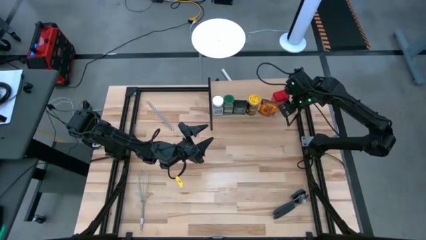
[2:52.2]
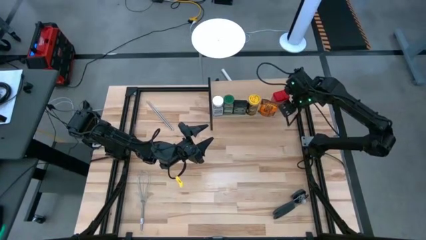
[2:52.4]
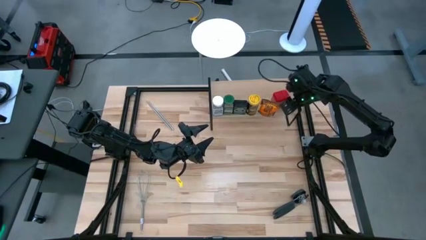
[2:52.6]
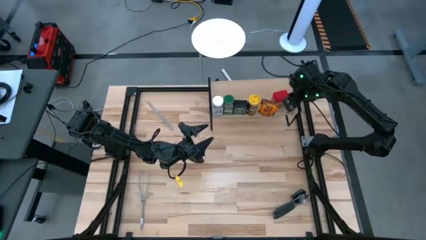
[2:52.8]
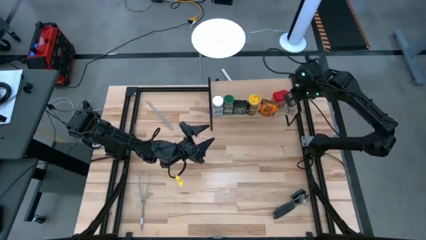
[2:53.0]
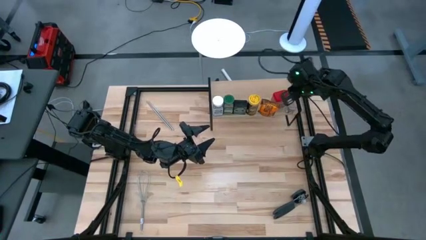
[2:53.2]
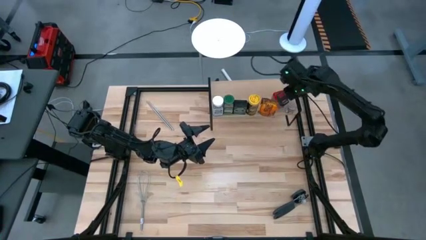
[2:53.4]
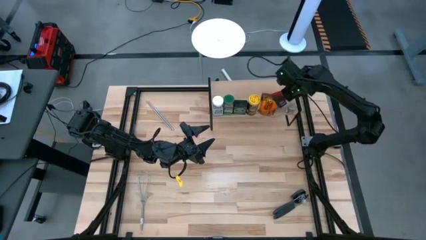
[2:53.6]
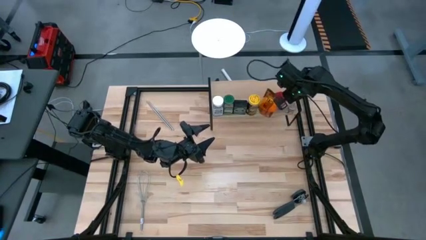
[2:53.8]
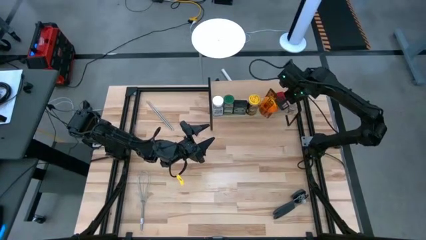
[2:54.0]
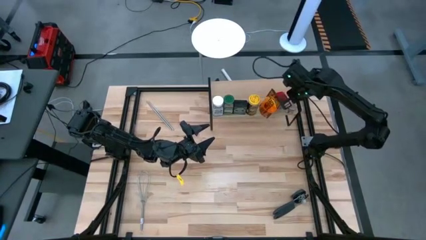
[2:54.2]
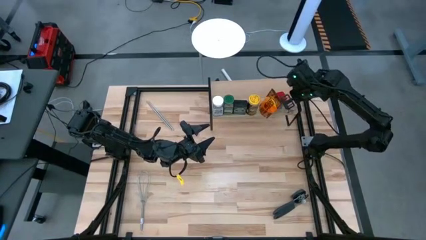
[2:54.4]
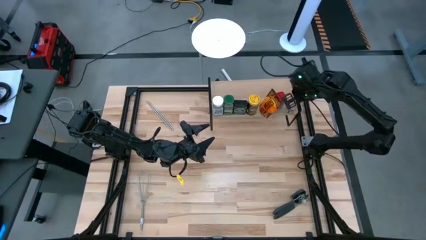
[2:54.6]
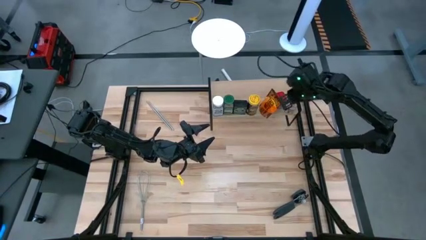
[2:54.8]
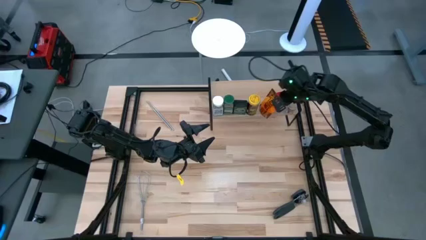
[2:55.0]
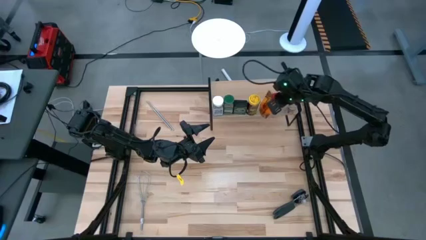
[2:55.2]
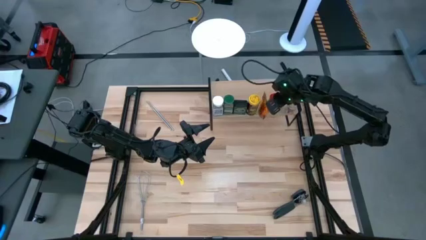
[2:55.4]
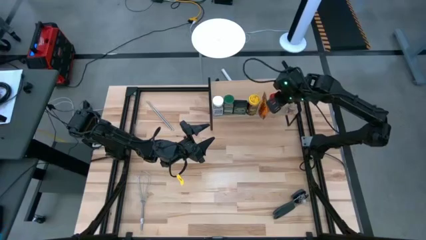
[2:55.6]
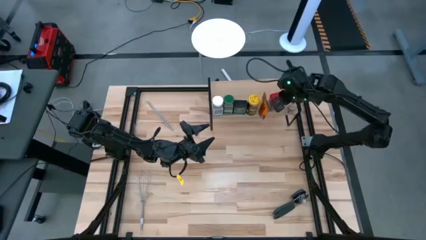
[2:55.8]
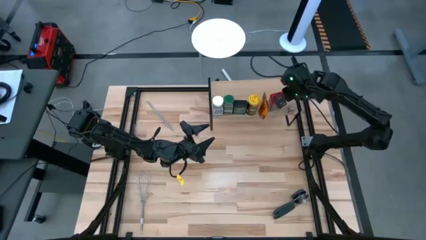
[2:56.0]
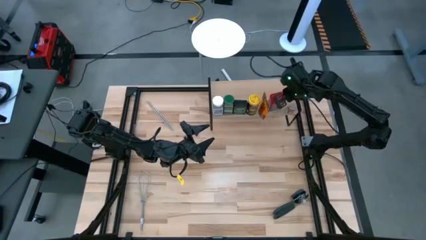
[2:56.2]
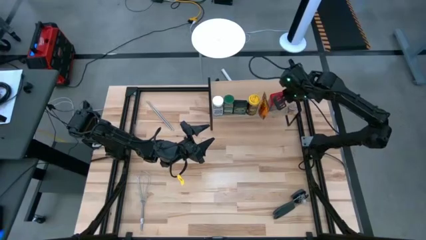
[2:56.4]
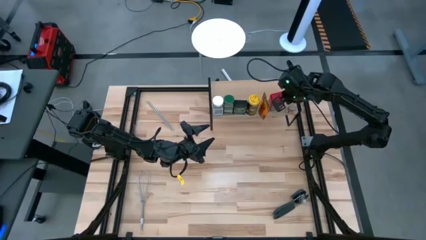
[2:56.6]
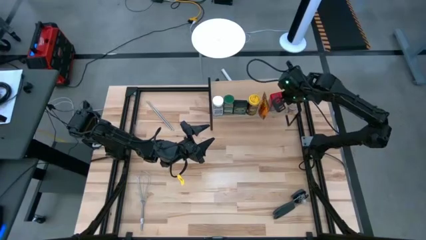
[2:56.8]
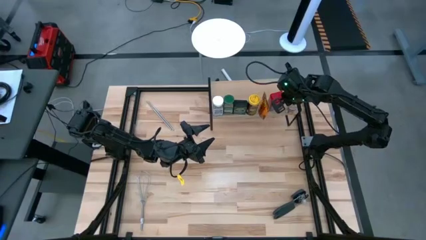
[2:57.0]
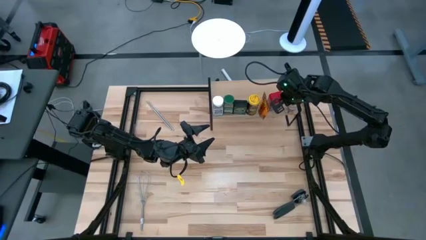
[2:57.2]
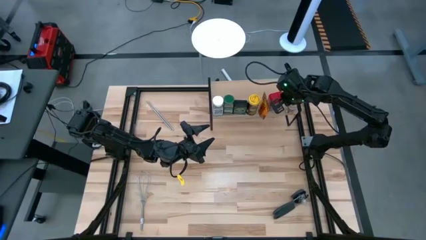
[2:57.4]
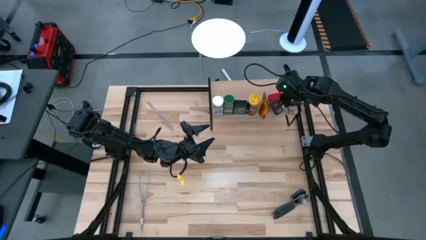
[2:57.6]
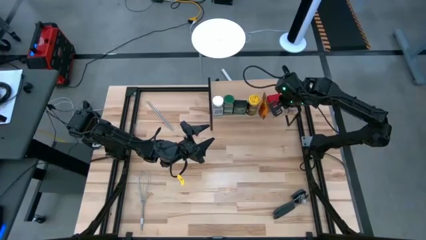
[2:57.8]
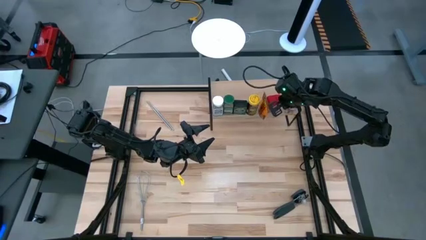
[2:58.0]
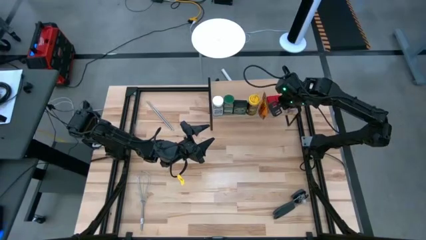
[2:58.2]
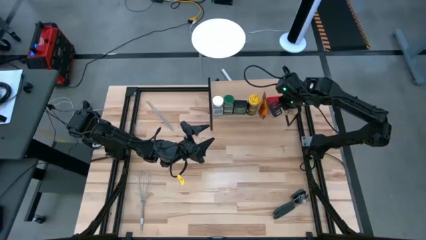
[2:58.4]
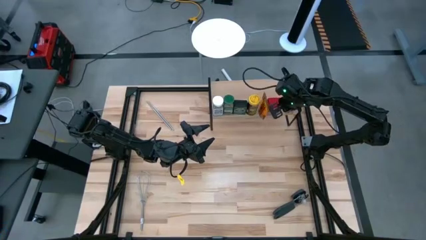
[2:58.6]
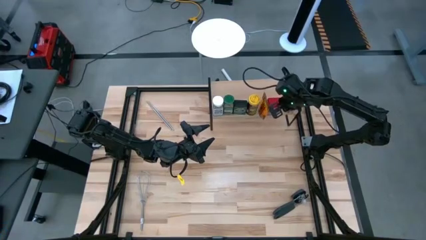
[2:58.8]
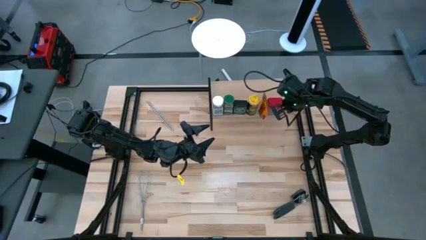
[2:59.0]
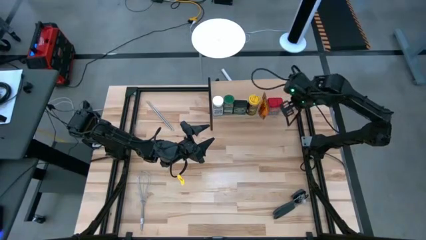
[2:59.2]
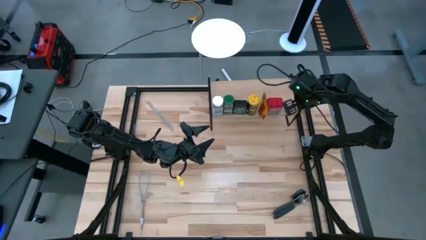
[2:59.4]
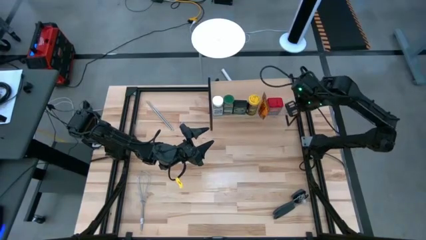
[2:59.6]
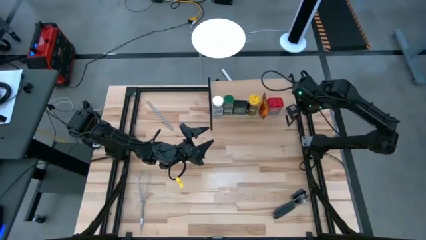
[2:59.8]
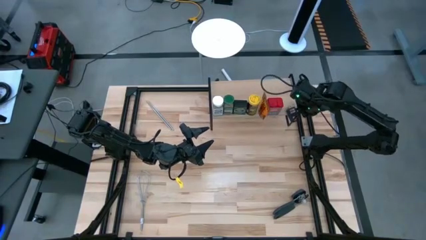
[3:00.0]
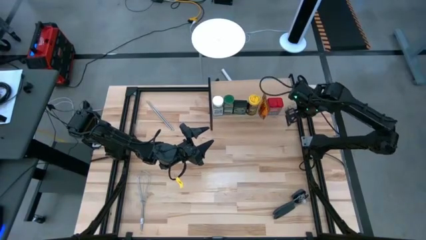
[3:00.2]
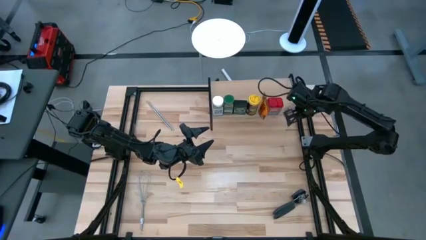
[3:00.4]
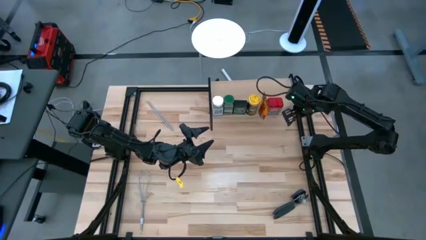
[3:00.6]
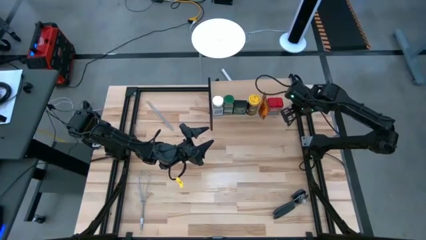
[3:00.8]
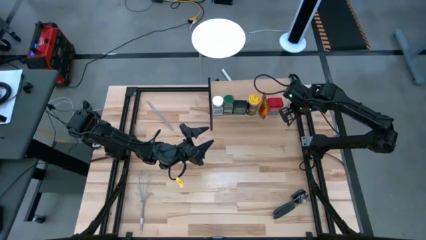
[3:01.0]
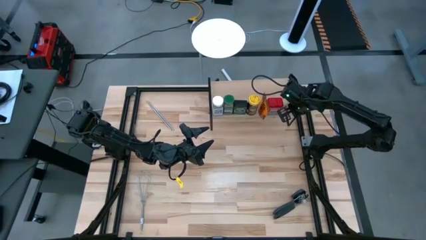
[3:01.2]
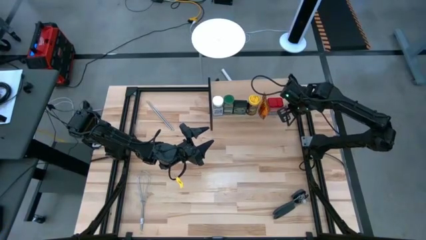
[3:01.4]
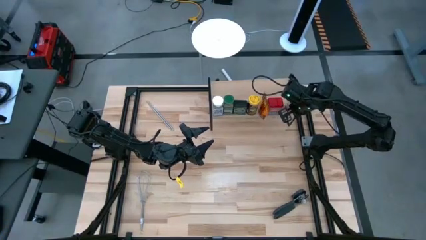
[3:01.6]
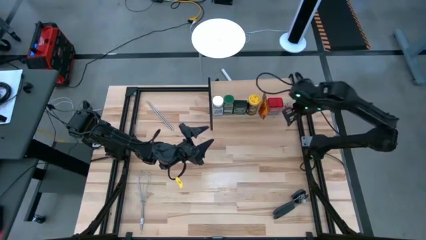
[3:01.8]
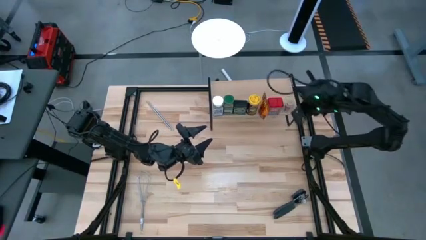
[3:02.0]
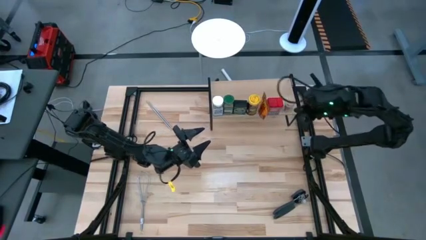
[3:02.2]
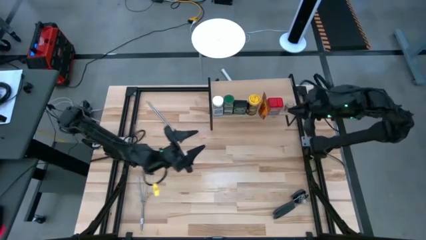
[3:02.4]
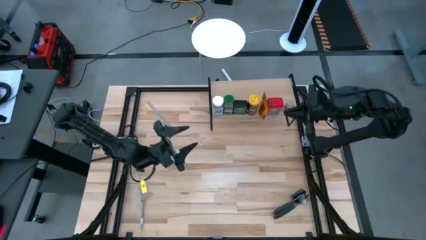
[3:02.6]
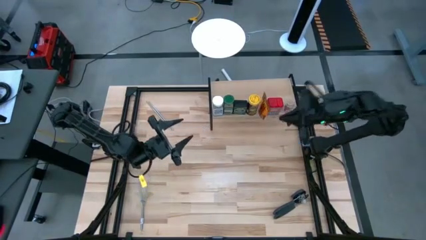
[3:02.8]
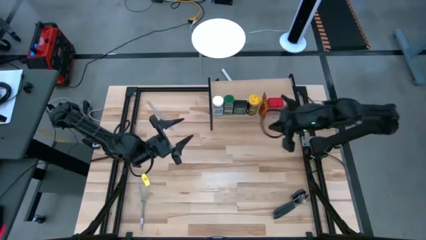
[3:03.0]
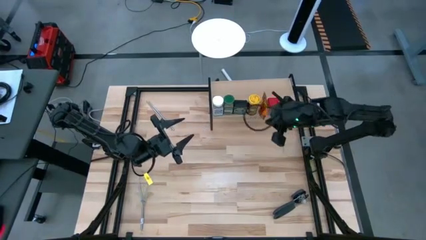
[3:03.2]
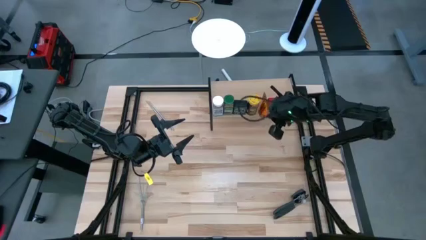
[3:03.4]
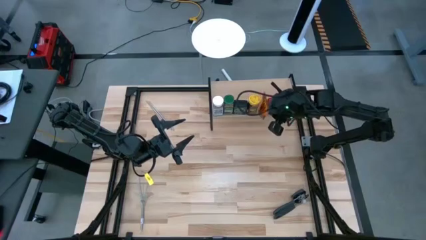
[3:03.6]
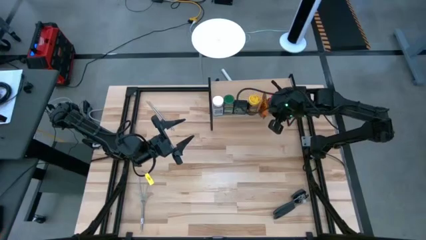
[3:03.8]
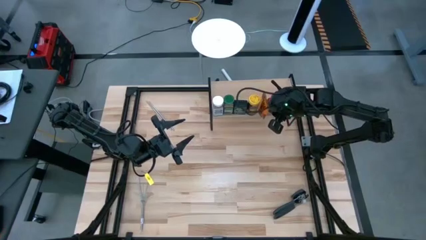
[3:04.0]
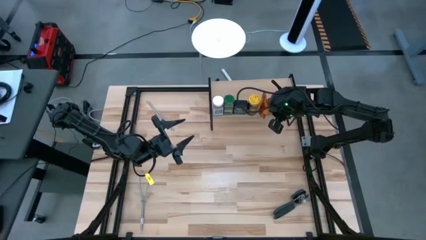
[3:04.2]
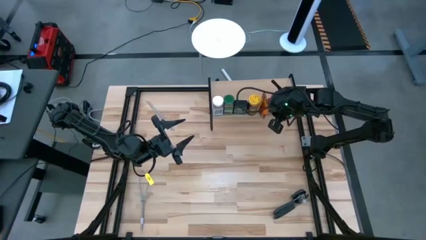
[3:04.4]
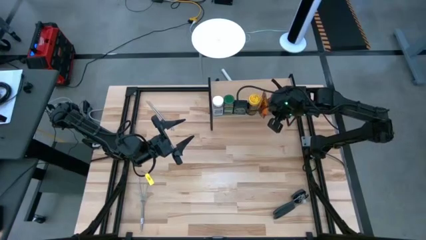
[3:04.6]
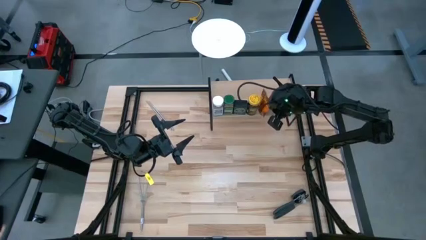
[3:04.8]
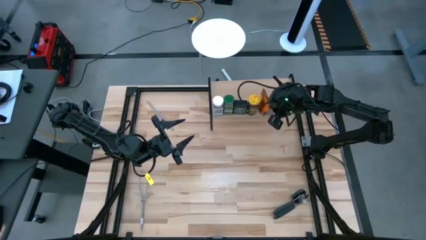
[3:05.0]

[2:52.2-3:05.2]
Task: Shelf spices
Adjust the seasonings on the shelf

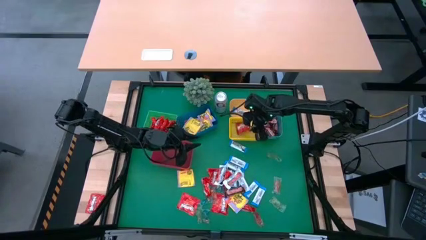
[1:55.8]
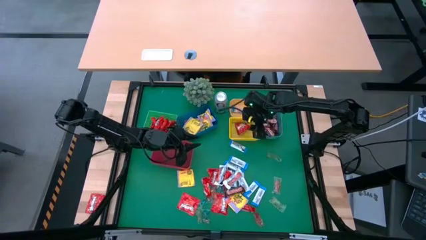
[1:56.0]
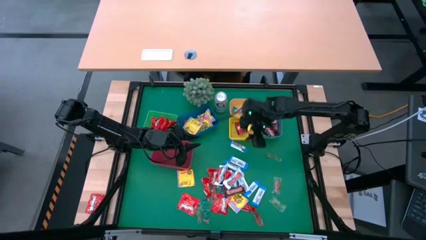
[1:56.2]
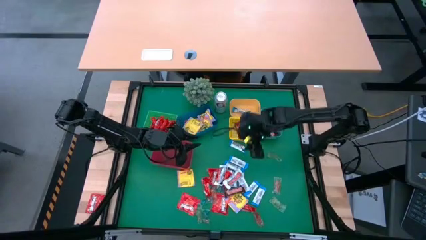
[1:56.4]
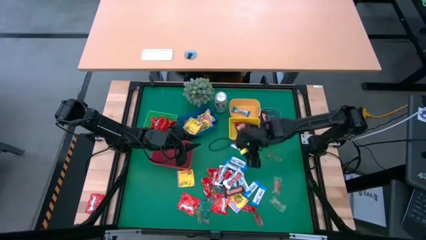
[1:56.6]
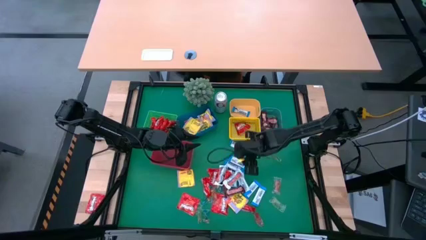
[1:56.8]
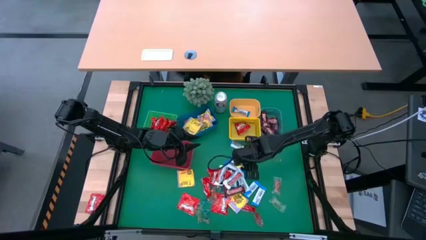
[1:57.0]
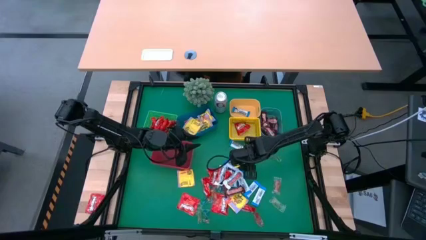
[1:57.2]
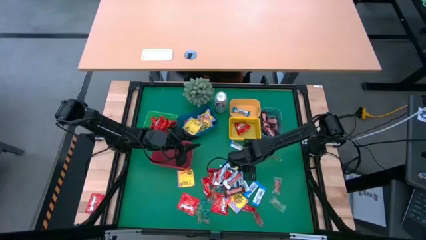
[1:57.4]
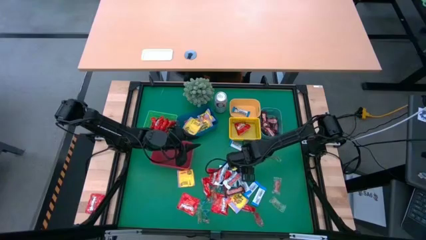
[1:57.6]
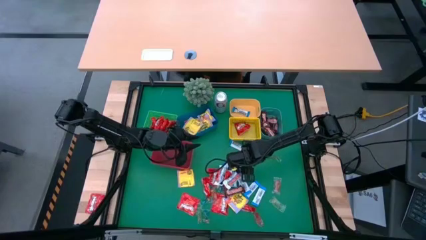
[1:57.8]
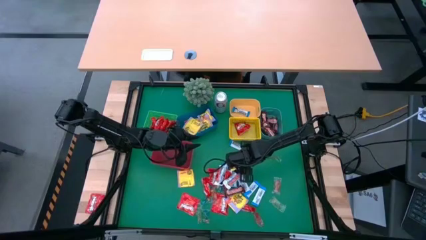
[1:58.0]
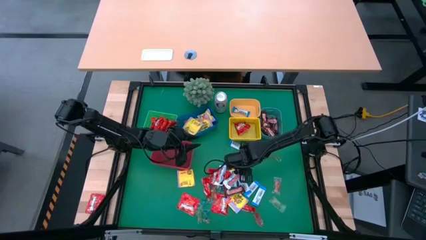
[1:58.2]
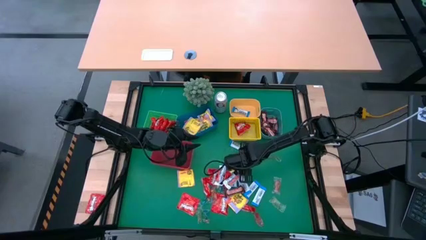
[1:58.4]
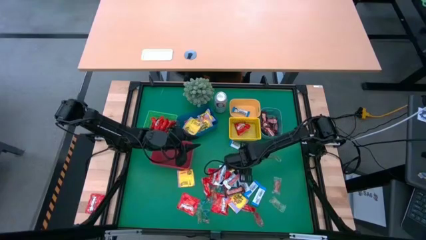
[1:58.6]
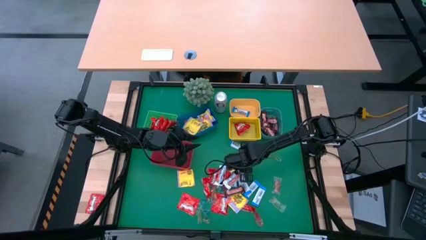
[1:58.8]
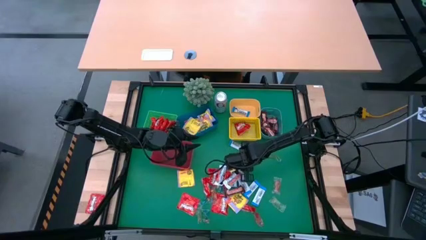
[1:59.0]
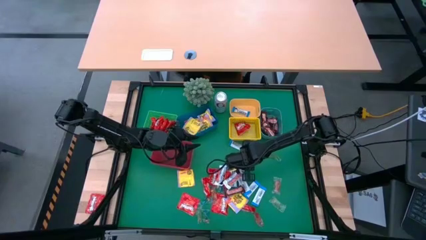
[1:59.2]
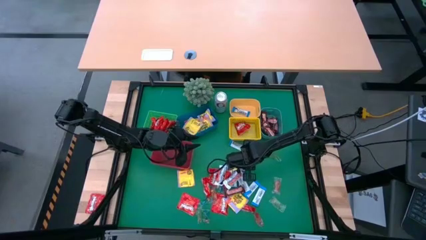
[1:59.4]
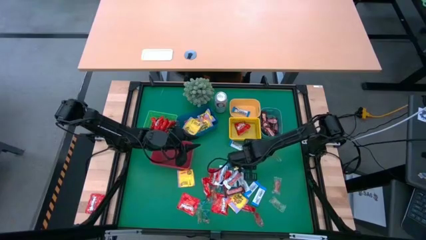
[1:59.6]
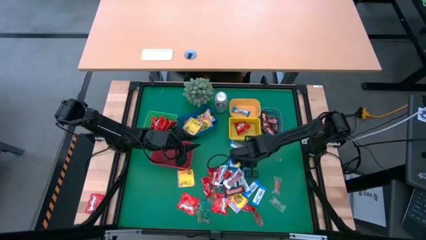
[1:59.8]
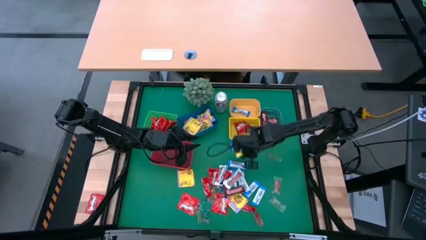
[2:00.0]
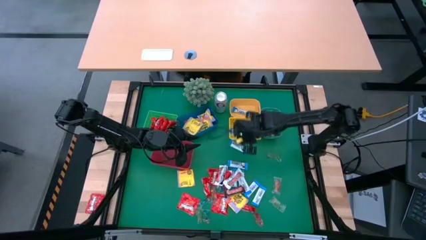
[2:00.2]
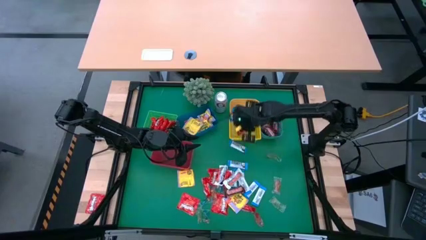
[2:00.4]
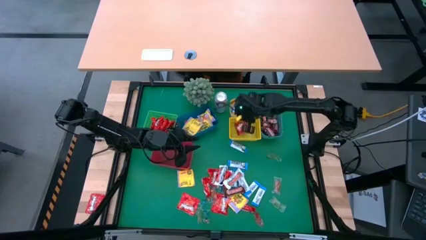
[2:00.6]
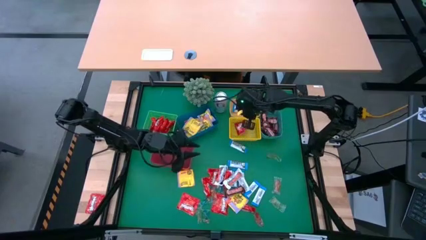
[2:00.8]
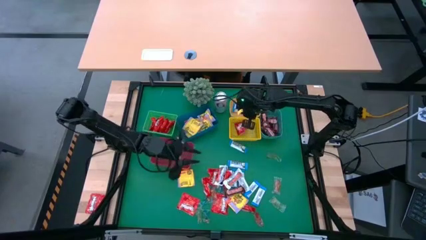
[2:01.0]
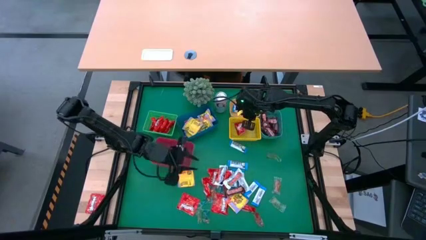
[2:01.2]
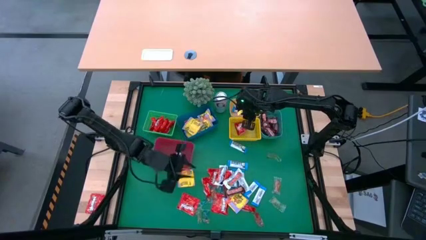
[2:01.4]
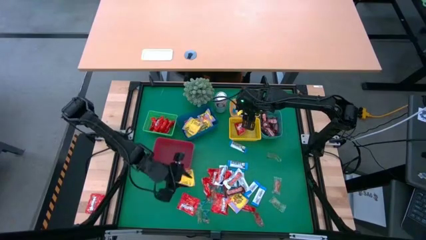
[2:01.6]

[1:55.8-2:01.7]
Task: Sort candy
Put the blue chocolate bar into the orange bin
